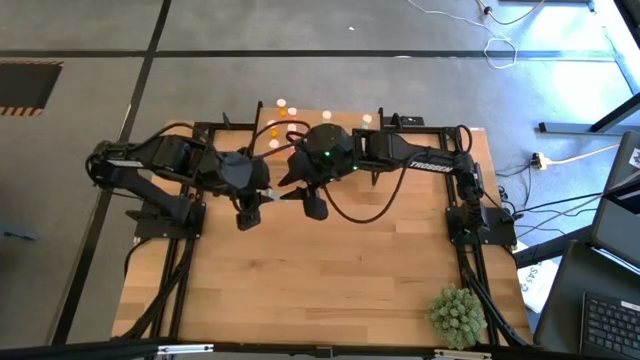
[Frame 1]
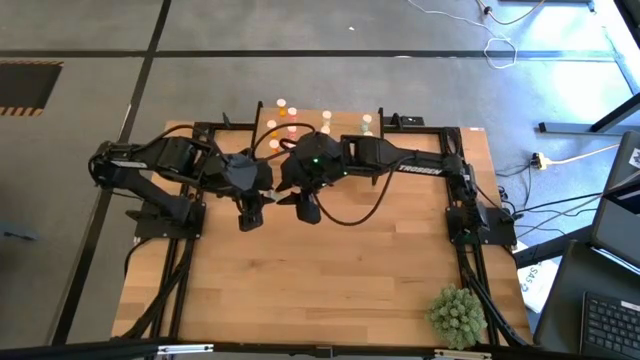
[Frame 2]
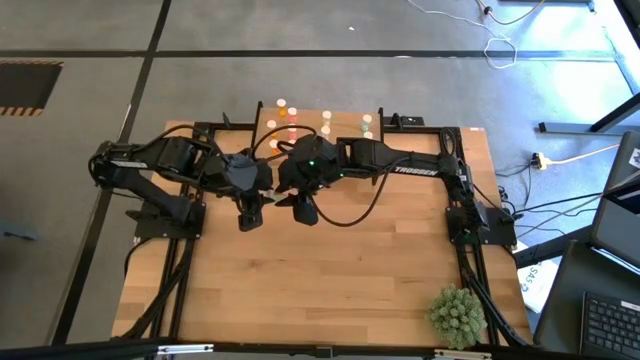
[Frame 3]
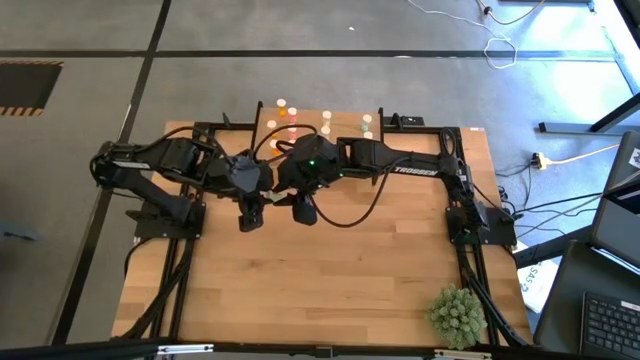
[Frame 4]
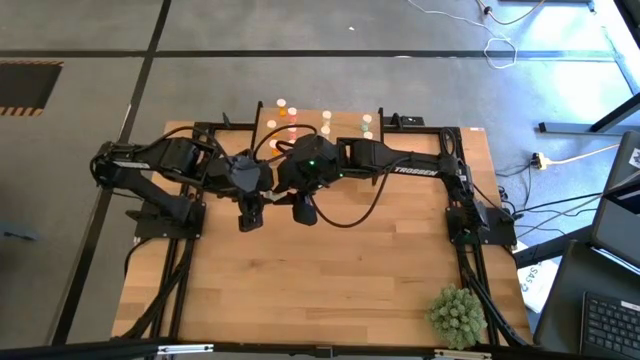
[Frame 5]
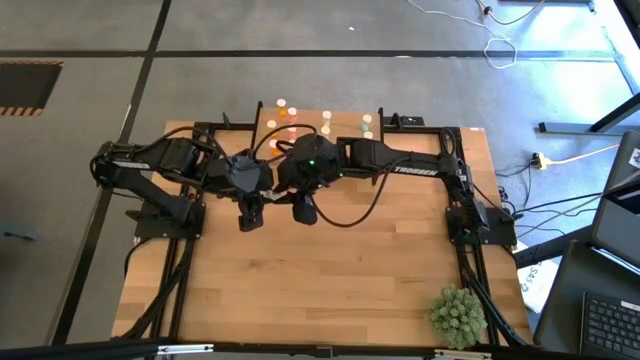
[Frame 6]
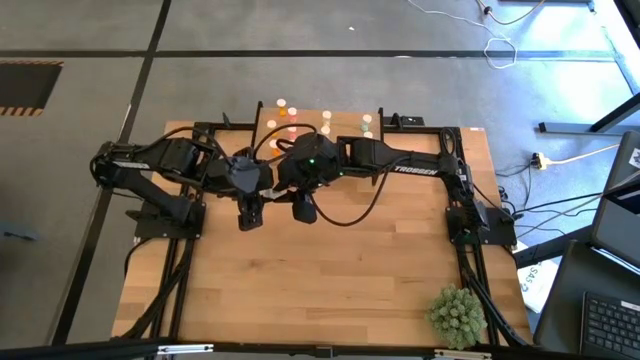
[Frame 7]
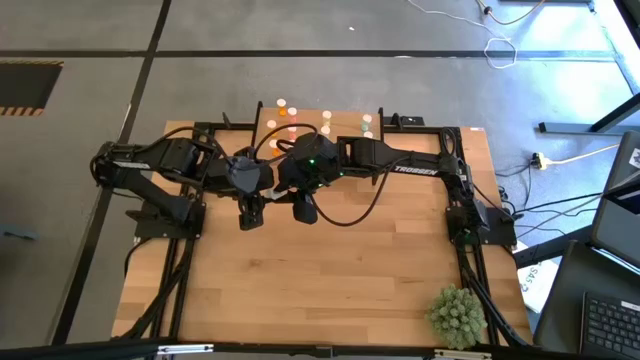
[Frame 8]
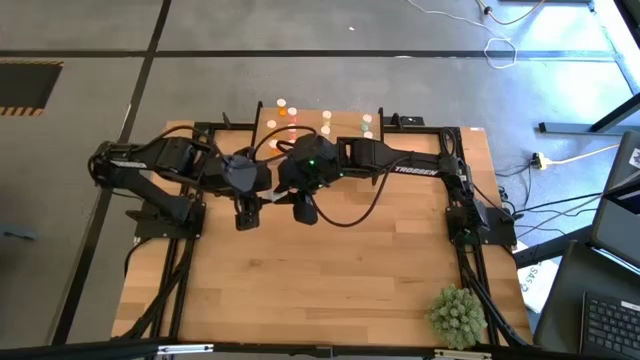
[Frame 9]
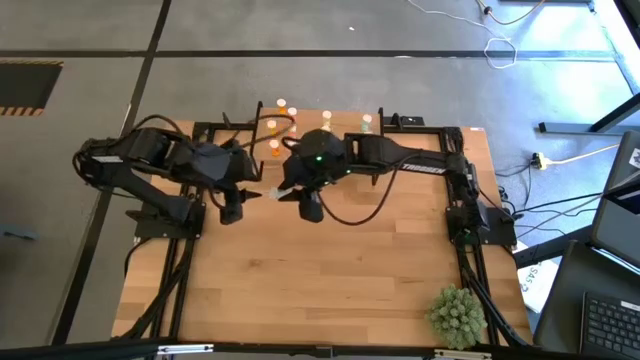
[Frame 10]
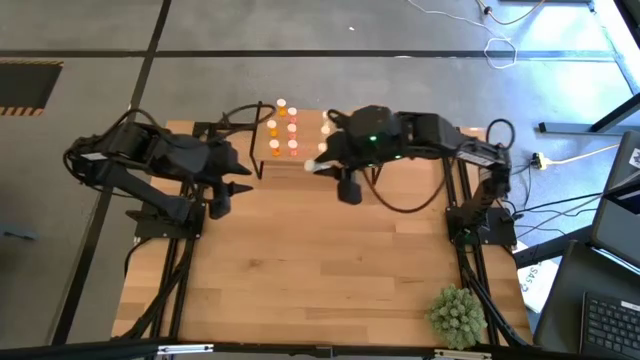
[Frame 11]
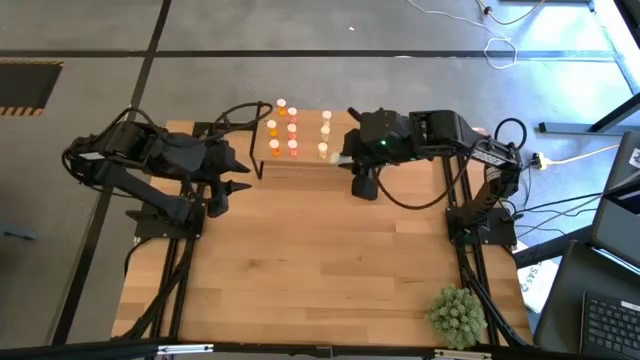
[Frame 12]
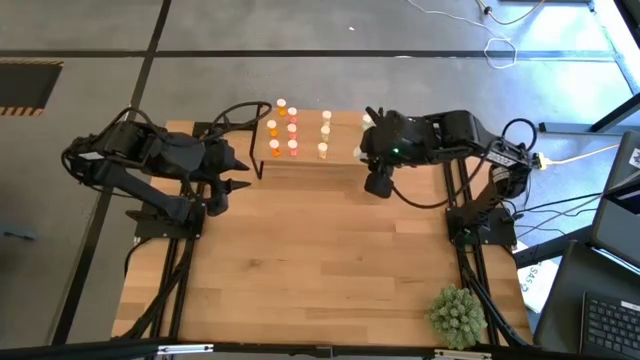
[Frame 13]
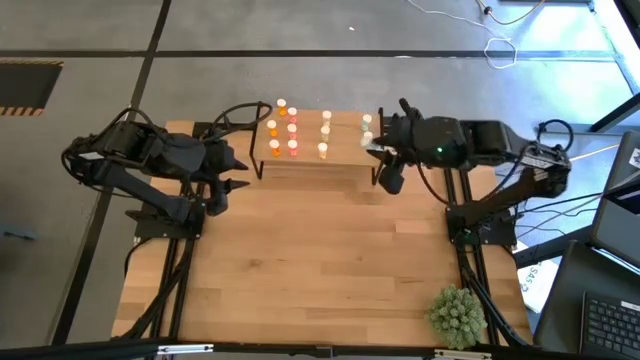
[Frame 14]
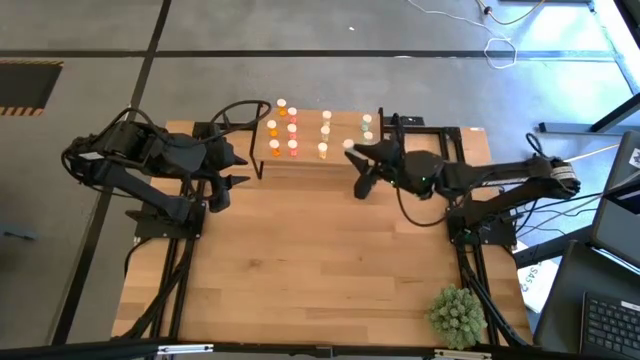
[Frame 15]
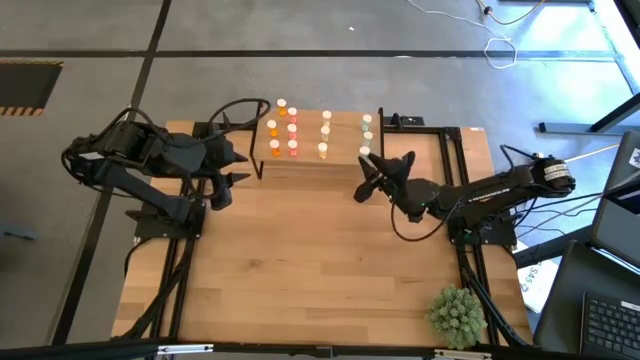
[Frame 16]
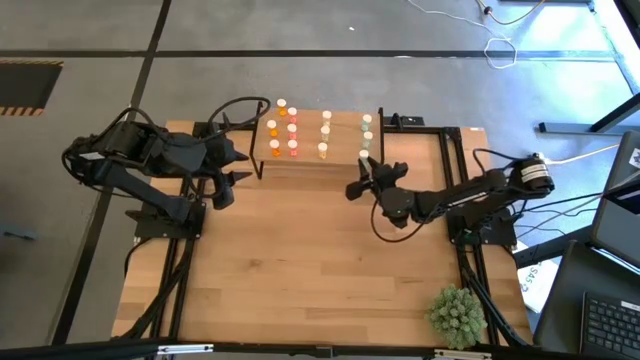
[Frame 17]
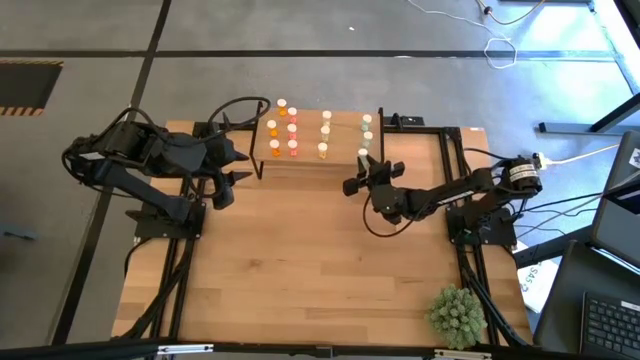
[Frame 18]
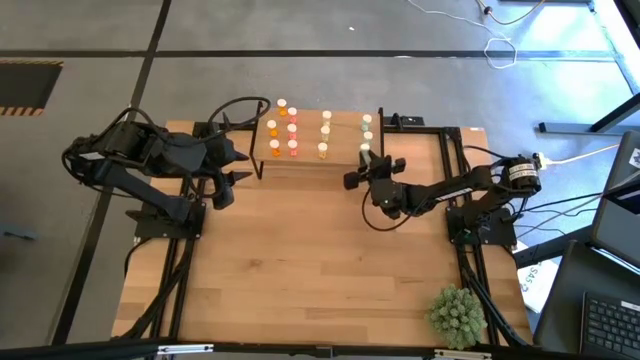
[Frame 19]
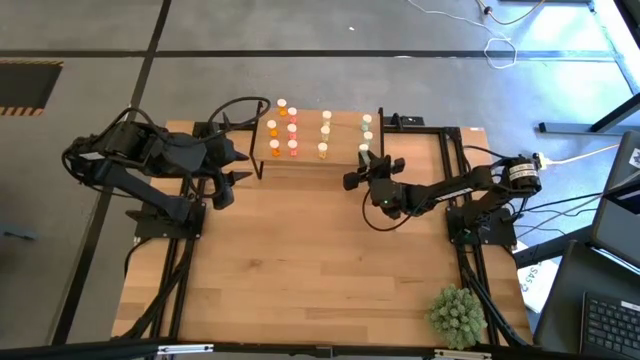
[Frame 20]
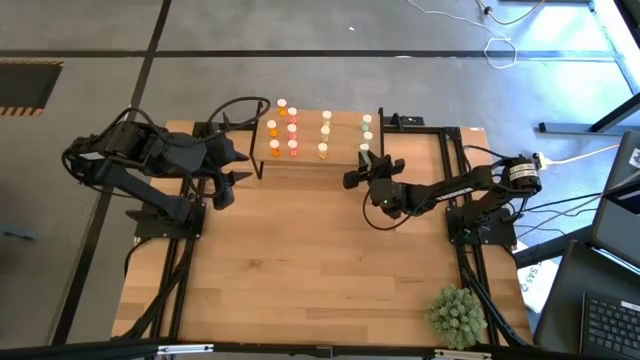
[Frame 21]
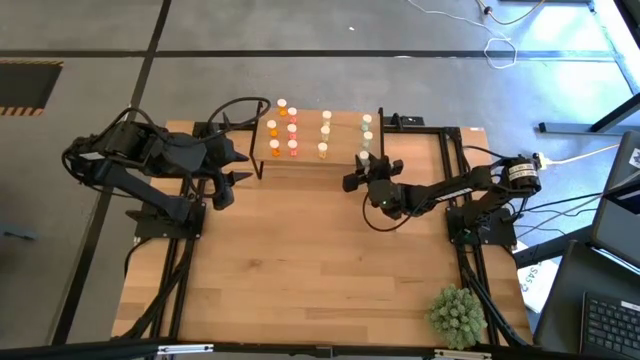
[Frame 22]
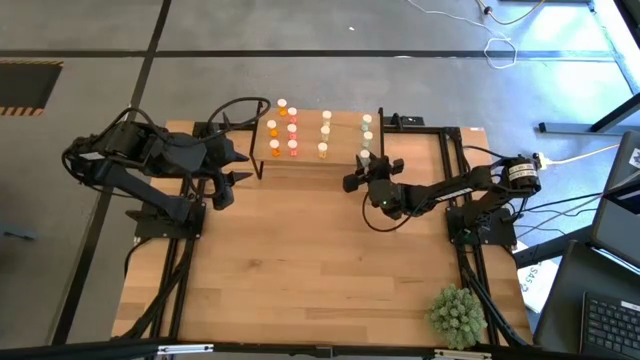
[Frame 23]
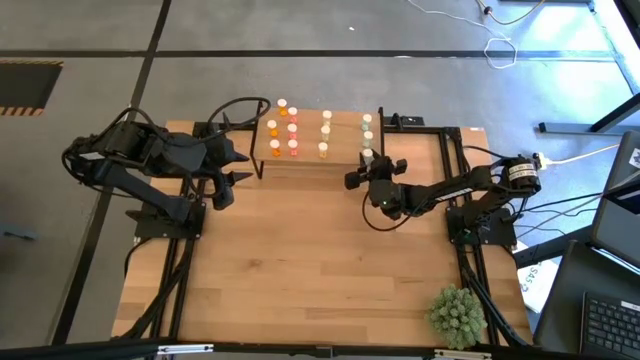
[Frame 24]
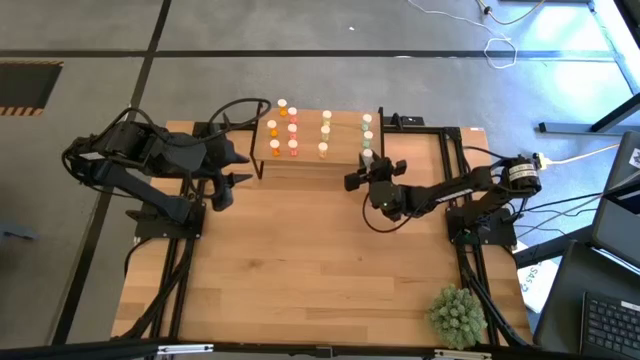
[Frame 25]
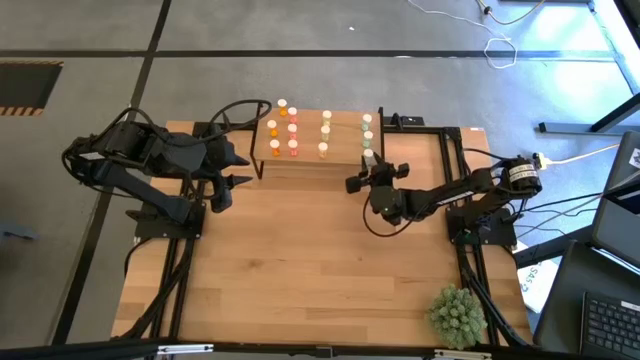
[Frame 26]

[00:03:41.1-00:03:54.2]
Task: Pick and place medicine bottles onto shelf by color
Put the blue pill bottle on the shelf aligned with the other blue pill bottles

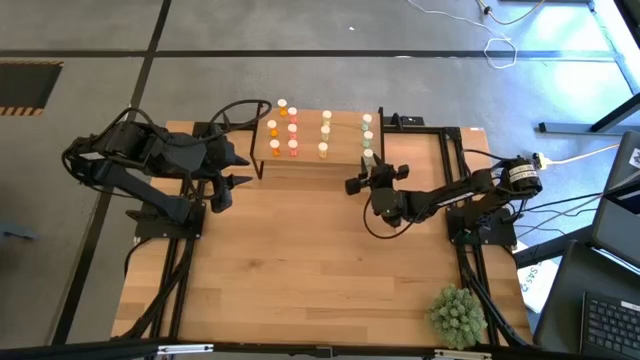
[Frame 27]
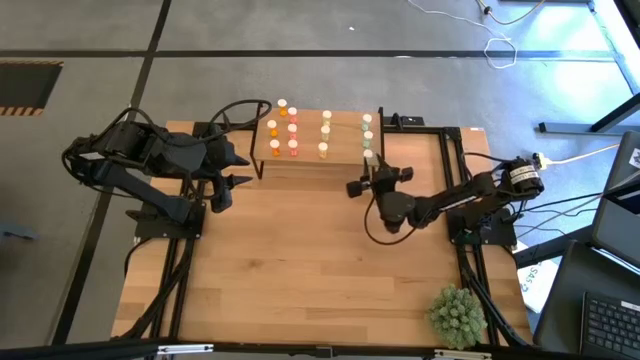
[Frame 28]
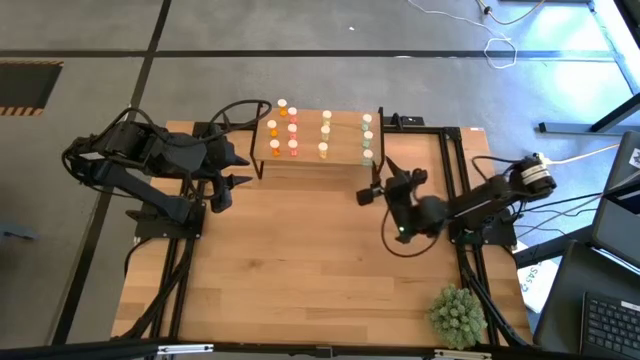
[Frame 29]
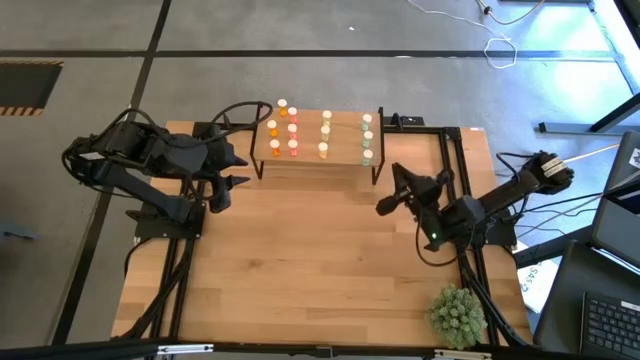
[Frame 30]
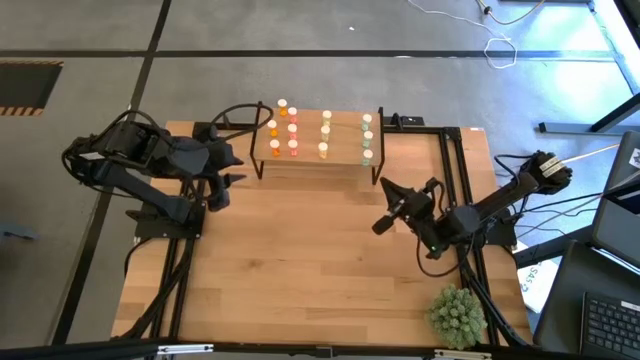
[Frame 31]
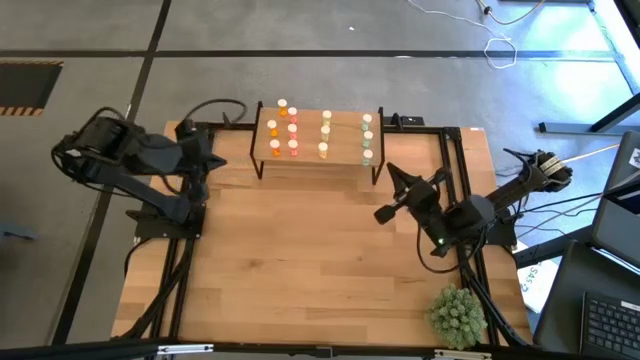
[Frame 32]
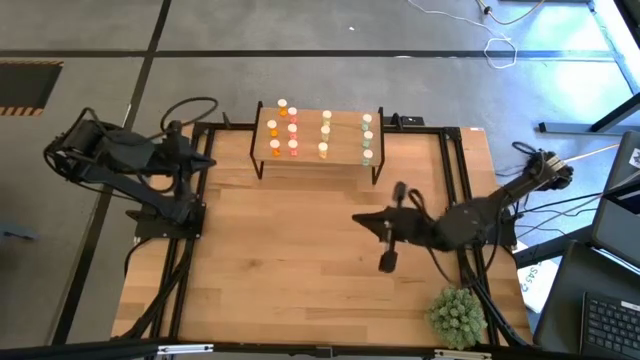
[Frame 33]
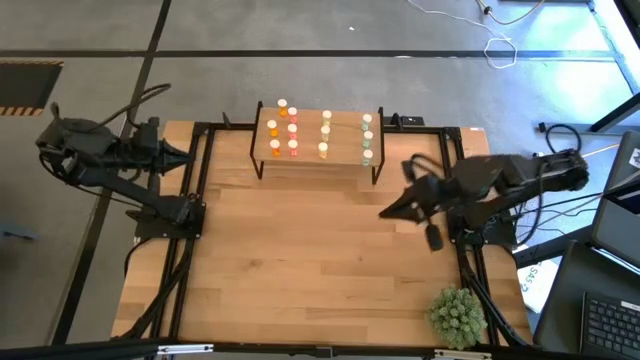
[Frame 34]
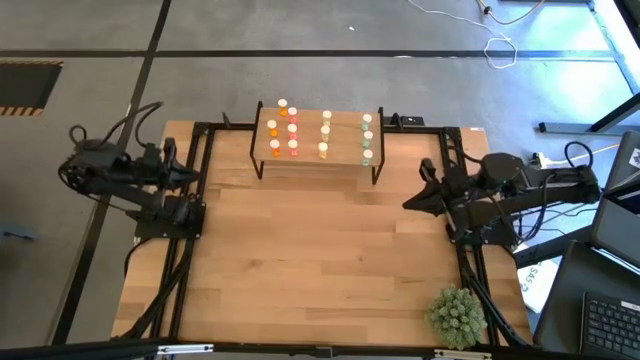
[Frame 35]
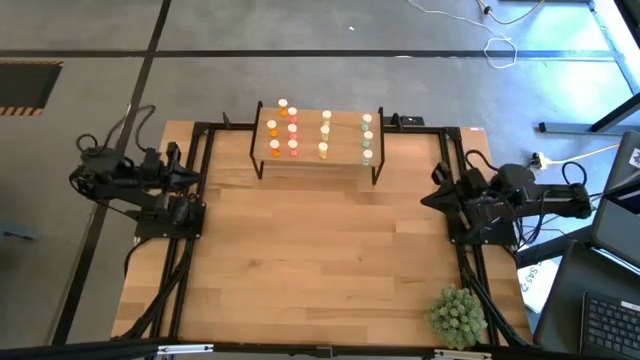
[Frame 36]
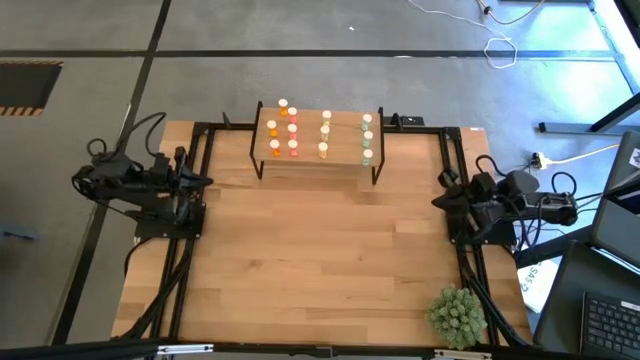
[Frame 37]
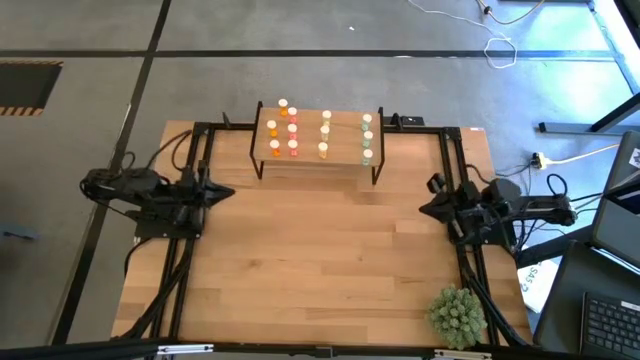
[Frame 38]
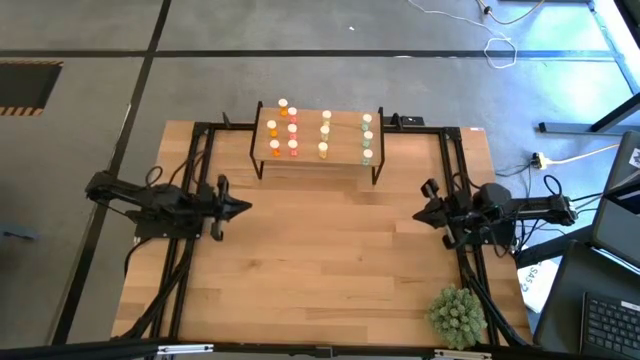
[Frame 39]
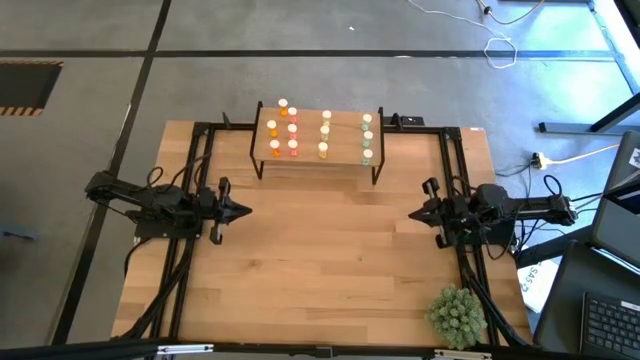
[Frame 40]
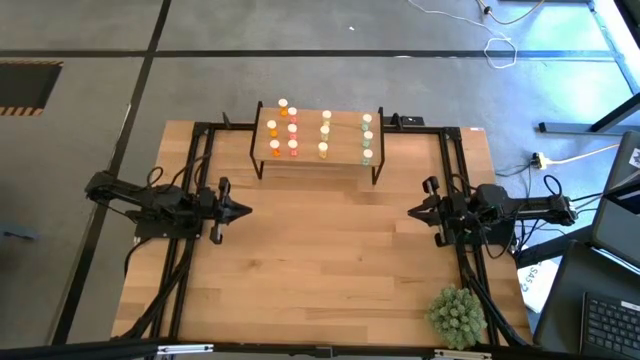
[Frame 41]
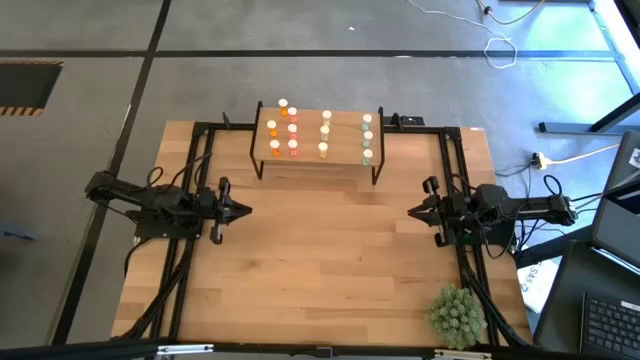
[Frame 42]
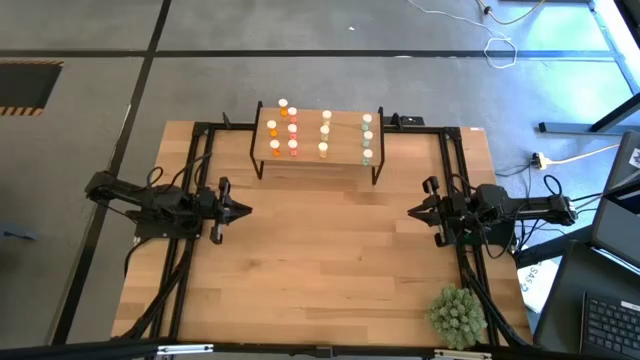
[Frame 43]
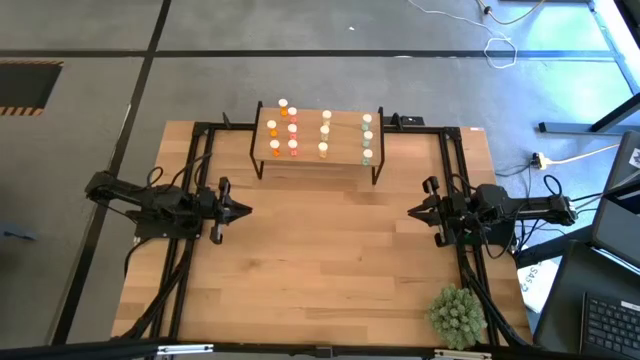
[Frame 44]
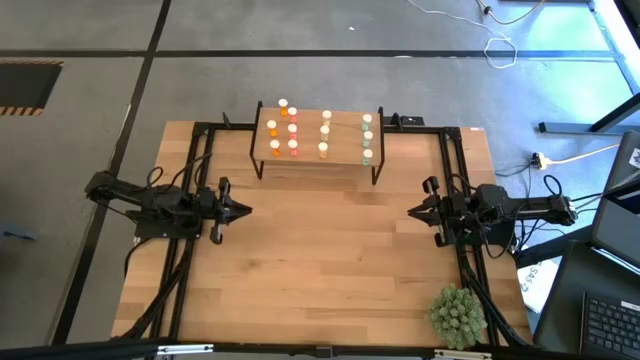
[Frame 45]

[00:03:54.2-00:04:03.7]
Return to Home Position
